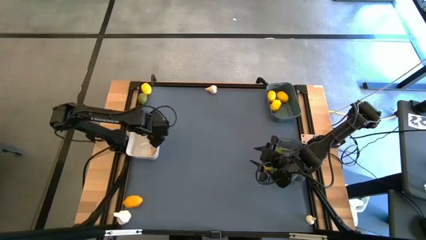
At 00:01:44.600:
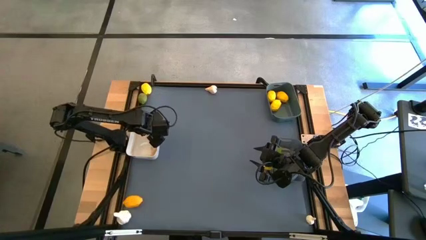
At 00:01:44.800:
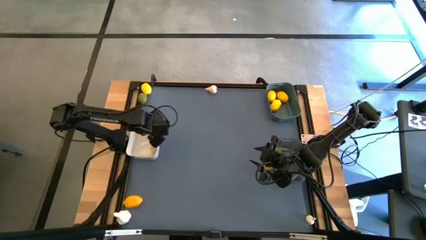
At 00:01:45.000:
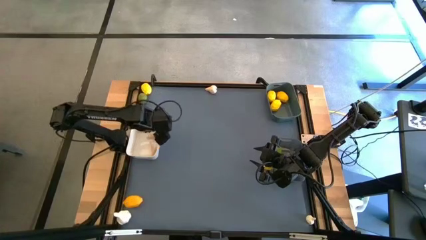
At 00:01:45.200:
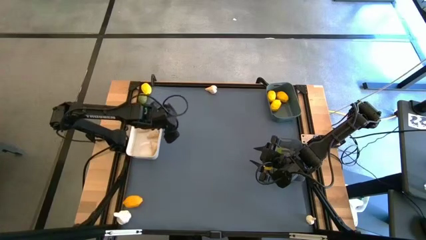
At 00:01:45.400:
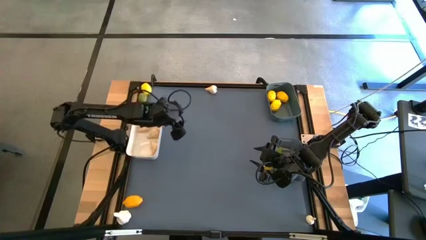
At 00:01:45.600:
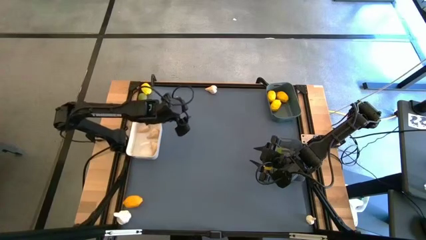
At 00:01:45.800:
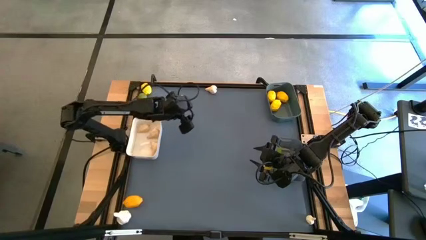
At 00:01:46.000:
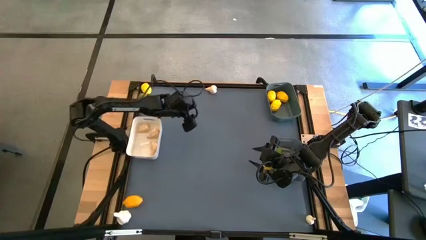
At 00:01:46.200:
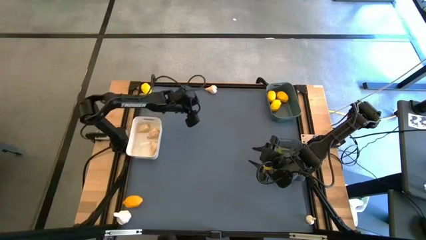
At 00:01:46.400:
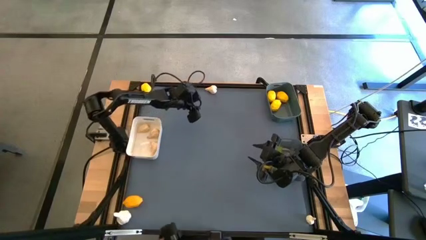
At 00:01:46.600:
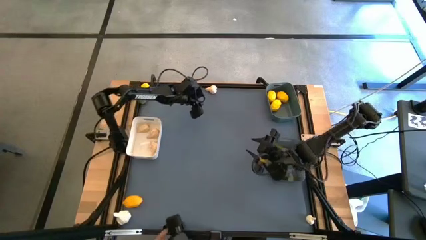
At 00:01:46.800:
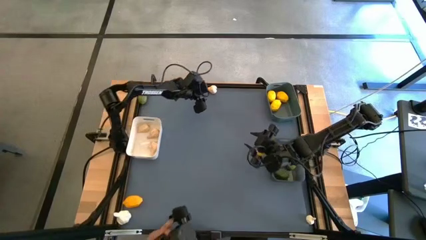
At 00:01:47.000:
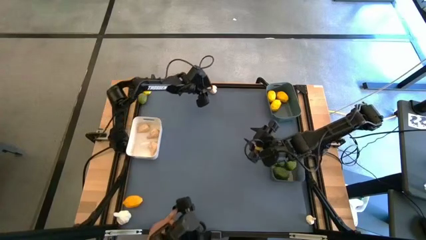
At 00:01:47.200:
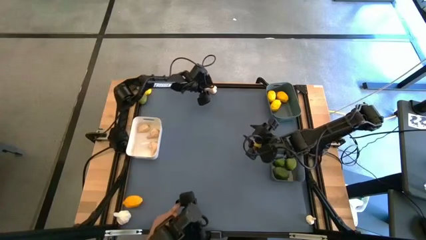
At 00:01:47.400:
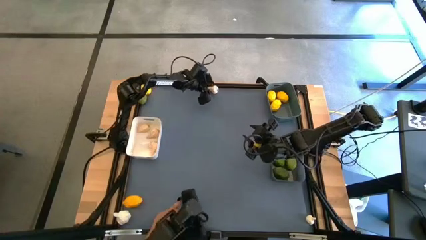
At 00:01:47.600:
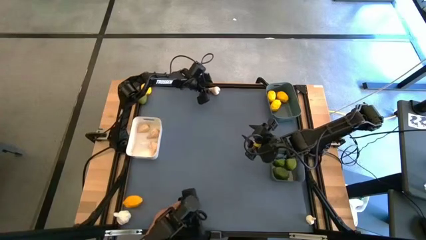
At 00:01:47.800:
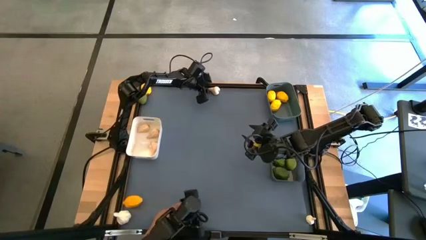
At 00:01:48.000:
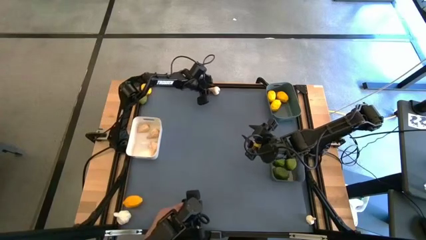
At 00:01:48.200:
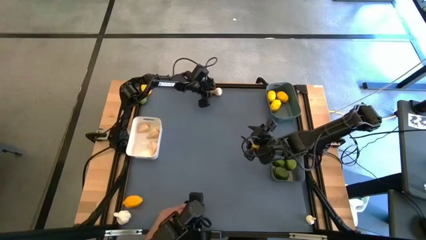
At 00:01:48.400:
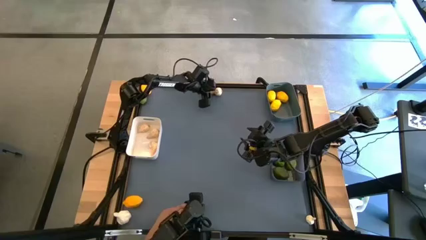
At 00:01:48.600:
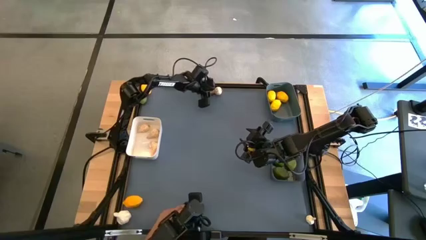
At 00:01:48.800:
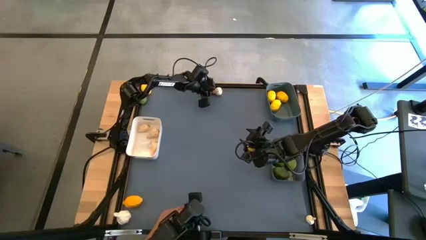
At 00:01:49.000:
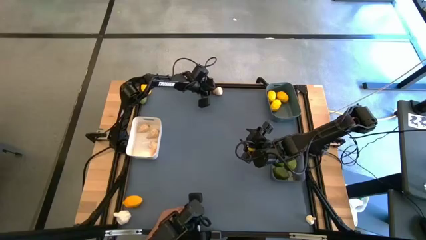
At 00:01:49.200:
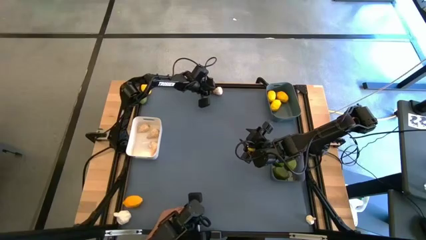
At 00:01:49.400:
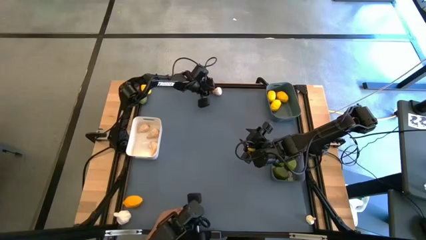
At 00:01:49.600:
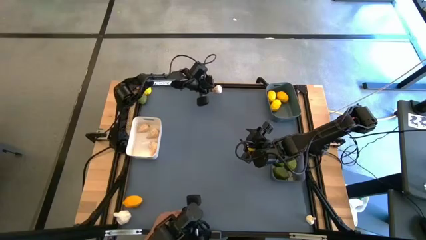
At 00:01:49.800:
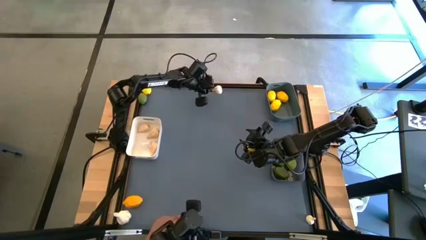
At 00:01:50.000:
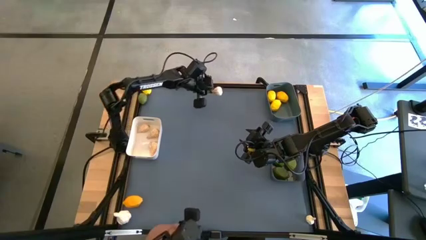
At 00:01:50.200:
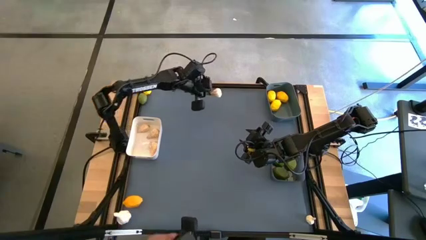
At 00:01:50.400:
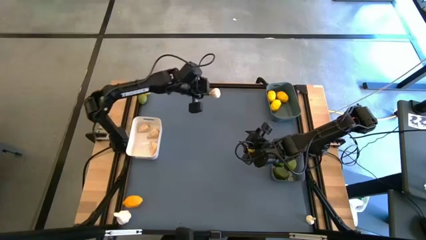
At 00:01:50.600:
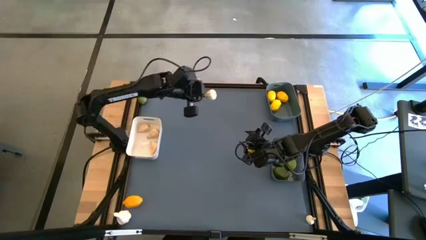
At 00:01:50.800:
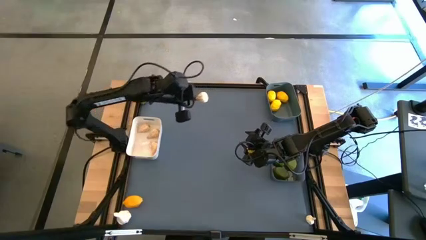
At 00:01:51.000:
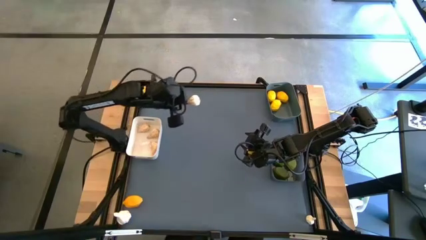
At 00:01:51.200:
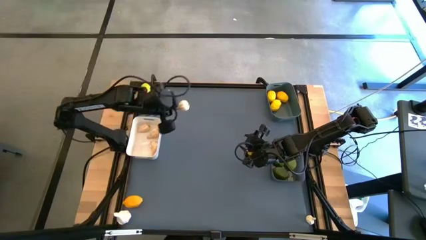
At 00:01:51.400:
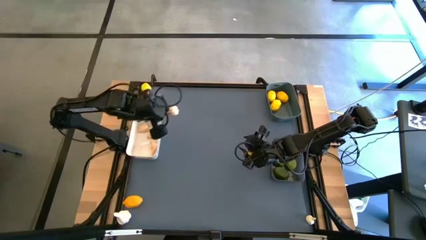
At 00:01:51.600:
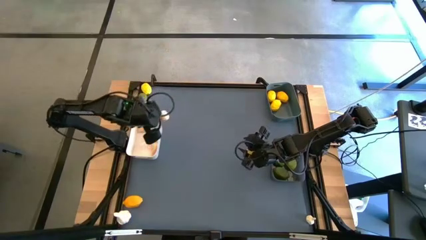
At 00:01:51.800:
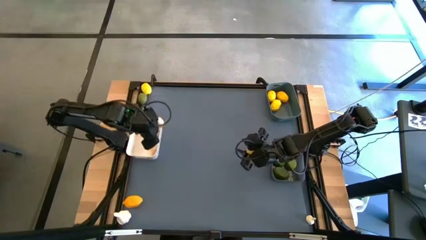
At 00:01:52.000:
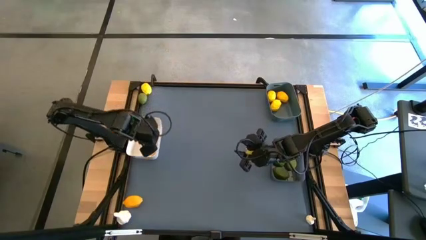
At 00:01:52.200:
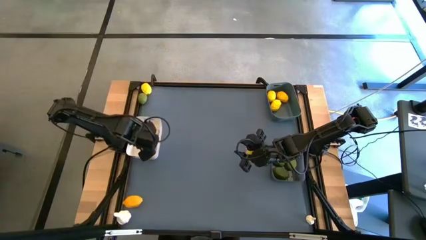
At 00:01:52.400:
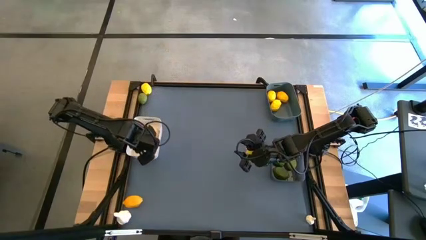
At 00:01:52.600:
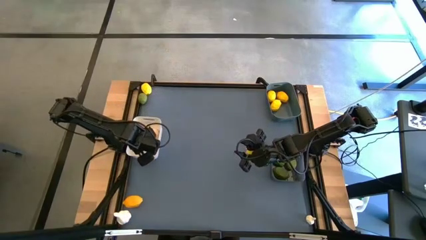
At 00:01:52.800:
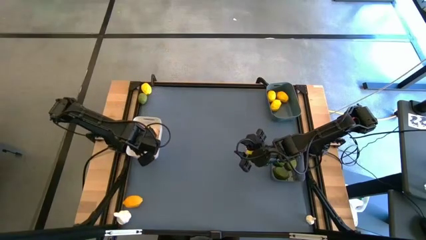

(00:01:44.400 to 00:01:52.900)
Task: Sort produce into baskets
Put the garlic into the white bin

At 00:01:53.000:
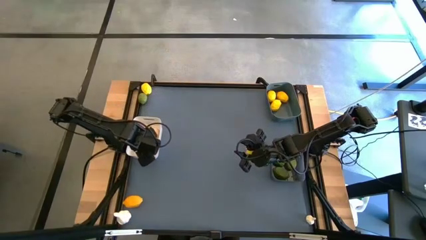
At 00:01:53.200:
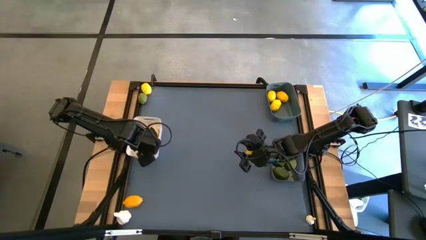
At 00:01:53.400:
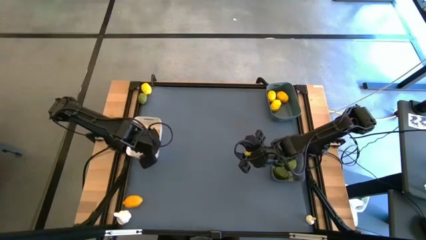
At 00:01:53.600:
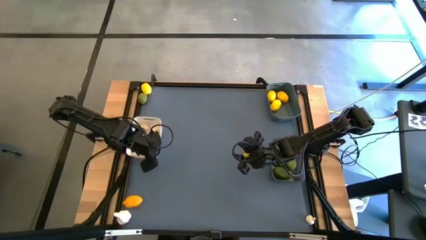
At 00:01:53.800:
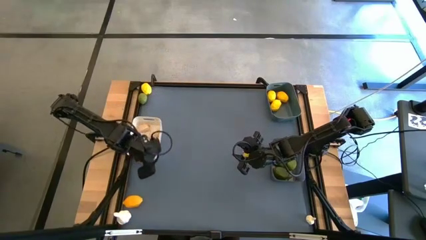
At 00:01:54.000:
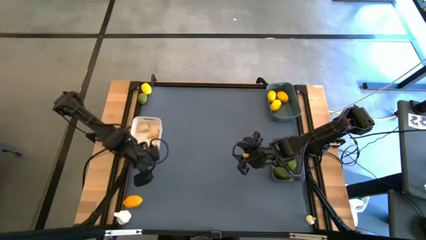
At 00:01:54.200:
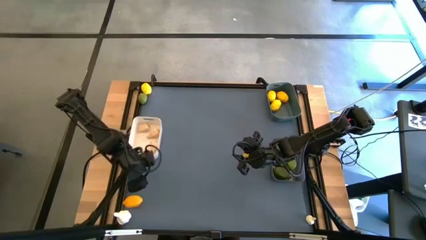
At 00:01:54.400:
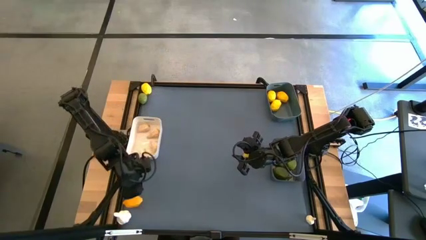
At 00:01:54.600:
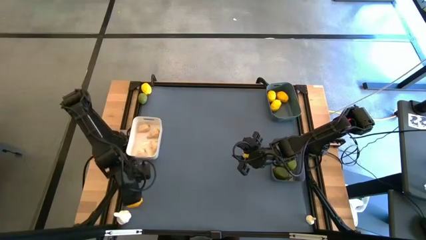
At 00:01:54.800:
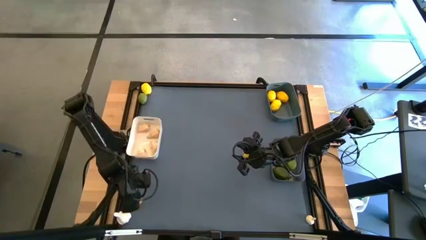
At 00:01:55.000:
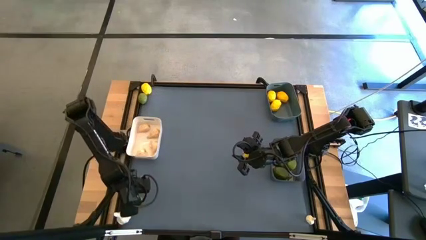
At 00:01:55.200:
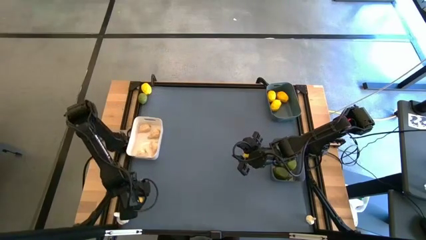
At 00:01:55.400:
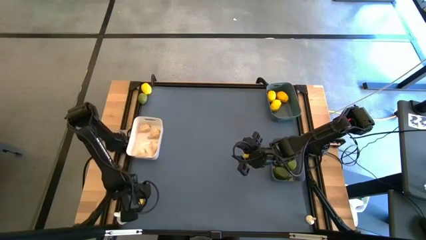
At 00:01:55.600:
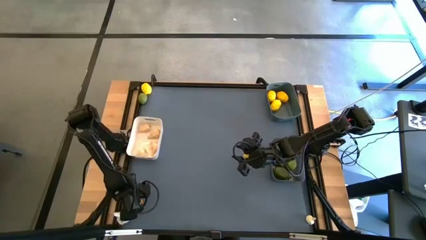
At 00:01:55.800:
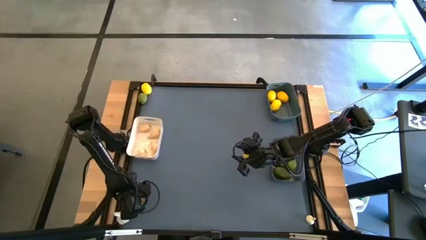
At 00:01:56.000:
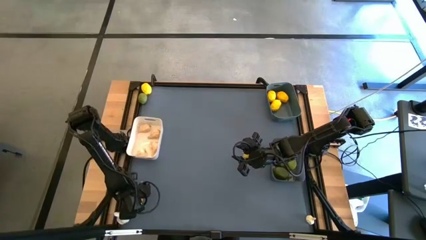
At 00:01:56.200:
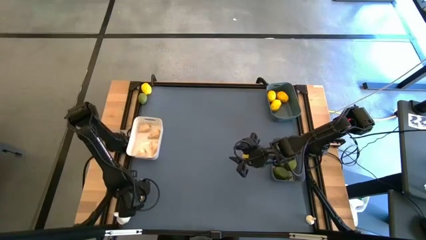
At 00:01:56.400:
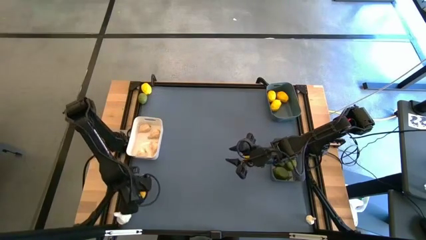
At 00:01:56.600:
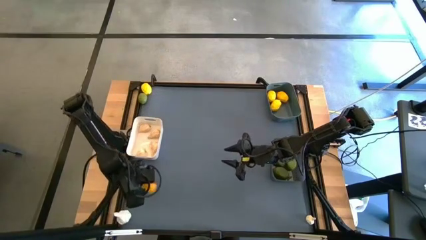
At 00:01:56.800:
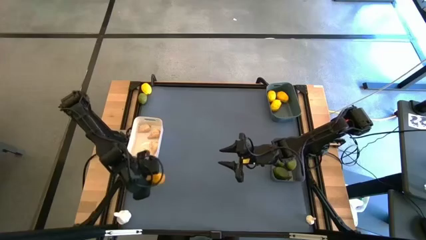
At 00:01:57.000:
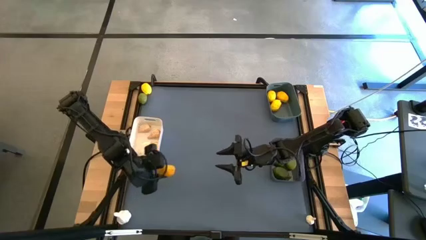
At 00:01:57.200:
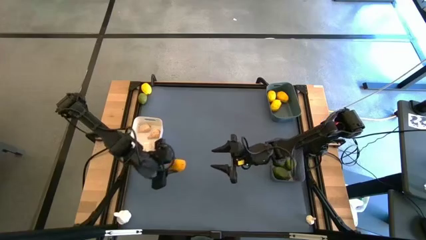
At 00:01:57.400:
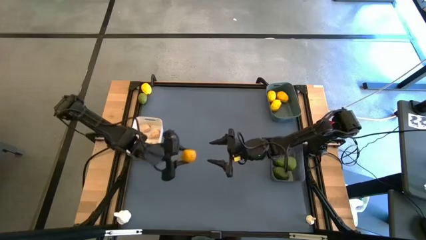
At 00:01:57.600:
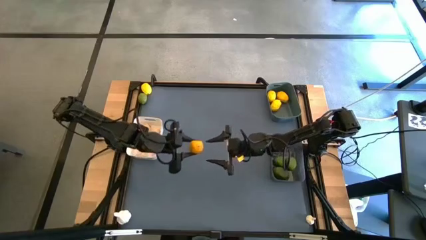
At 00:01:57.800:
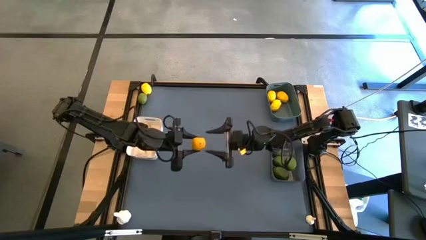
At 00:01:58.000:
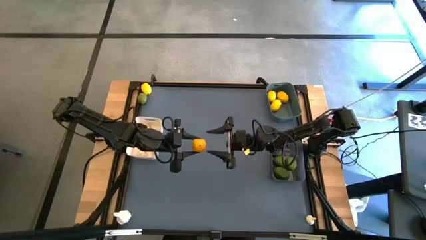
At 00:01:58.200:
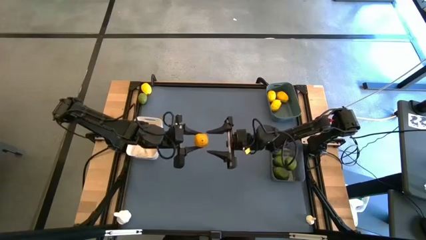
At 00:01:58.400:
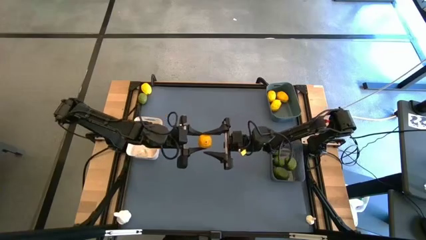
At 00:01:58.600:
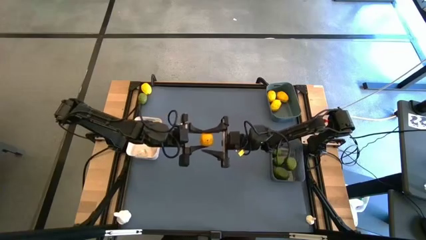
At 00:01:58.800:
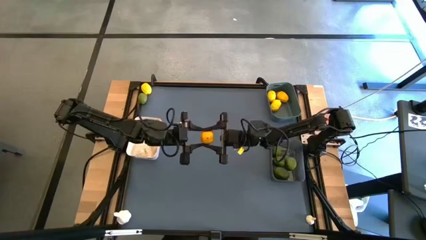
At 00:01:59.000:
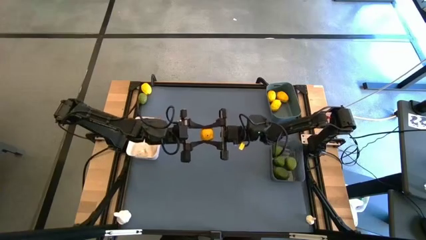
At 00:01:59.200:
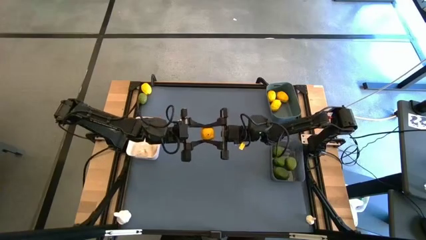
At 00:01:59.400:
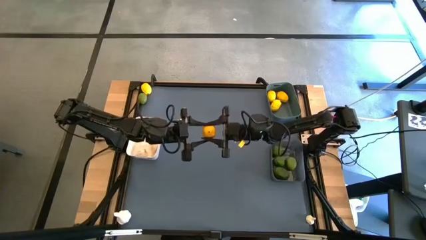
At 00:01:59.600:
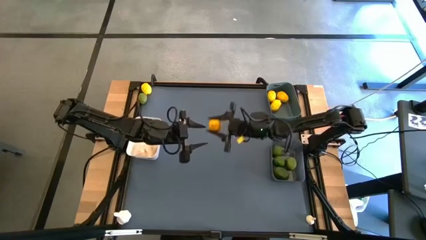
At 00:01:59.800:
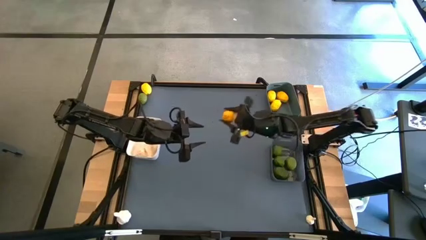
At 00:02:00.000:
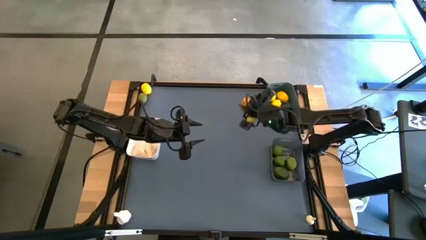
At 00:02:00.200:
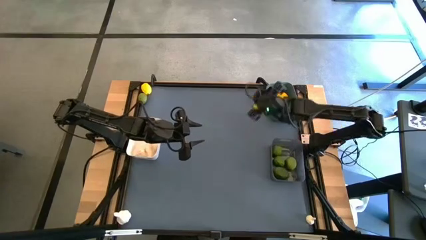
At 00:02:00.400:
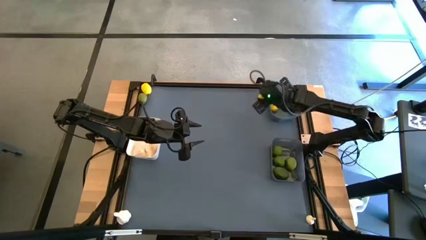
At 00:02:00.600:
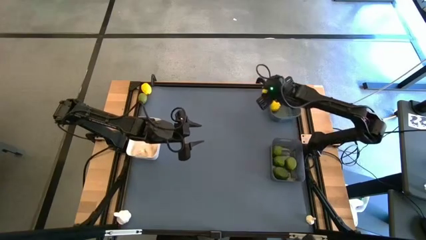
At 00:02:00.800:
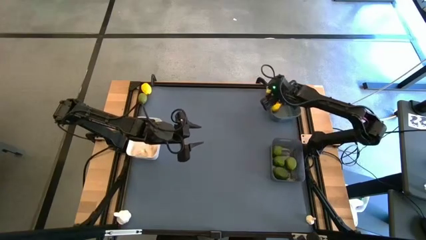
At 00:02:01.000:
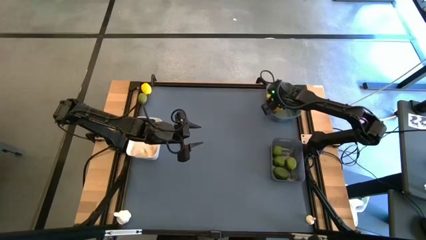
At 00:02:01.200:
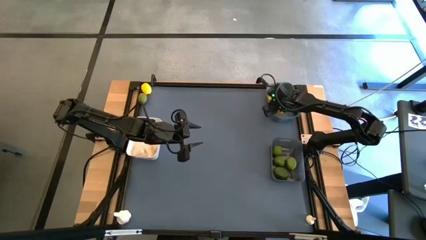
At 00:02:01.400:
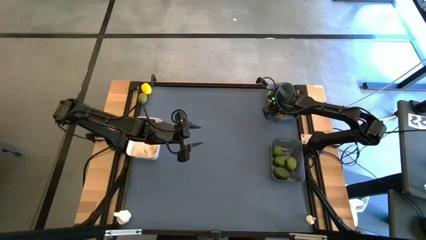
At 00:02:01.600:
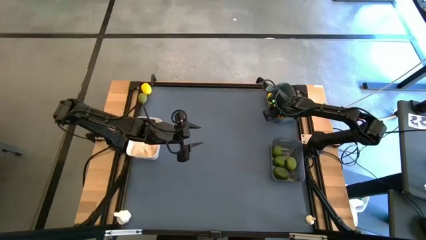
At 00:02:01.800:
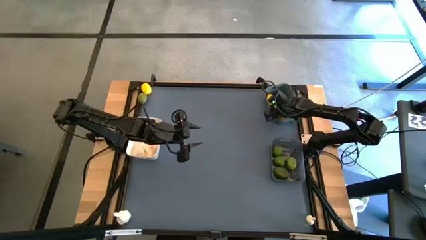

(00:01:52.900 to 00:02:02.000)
Put the lemon into the blue bin
